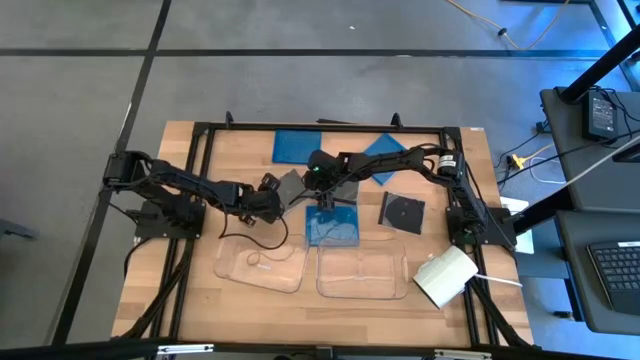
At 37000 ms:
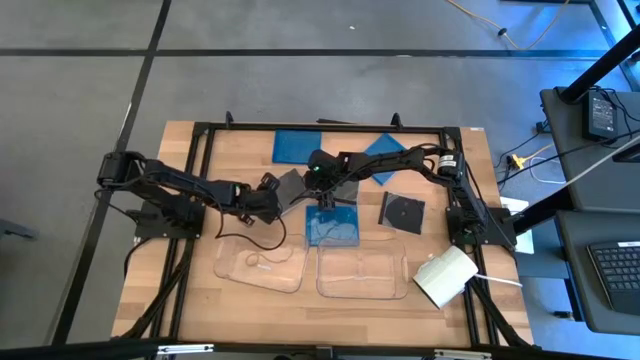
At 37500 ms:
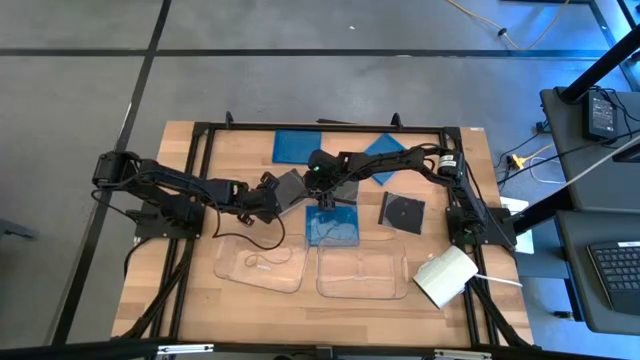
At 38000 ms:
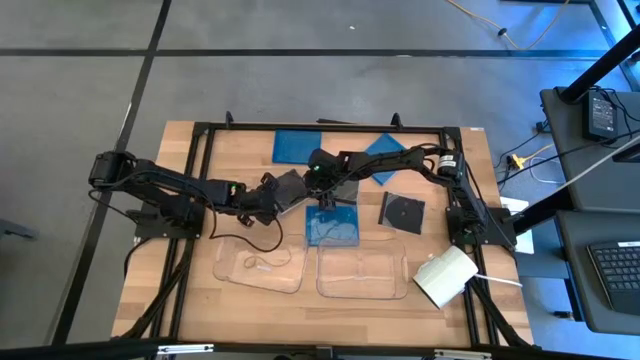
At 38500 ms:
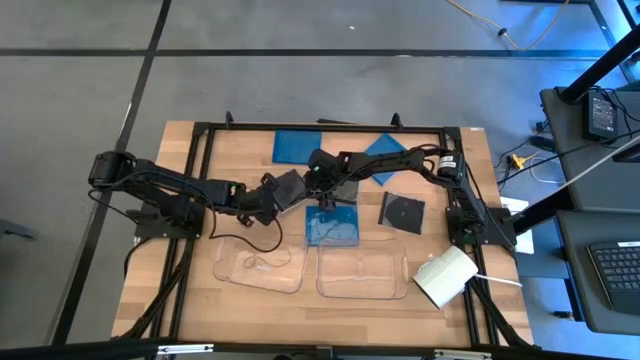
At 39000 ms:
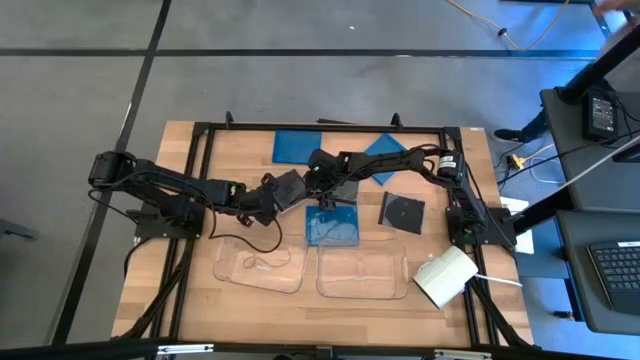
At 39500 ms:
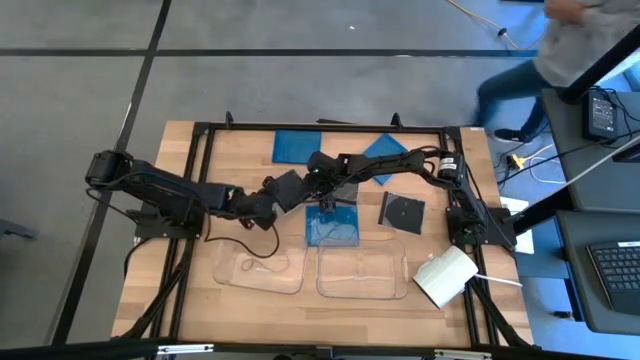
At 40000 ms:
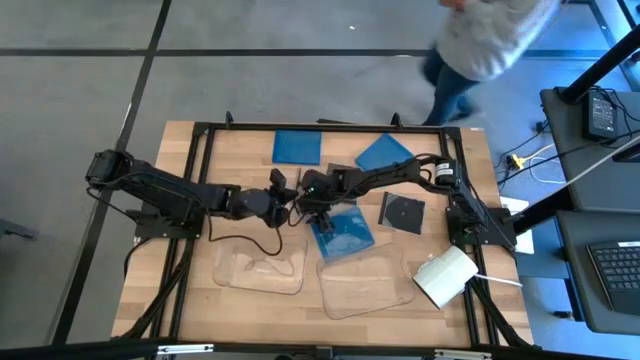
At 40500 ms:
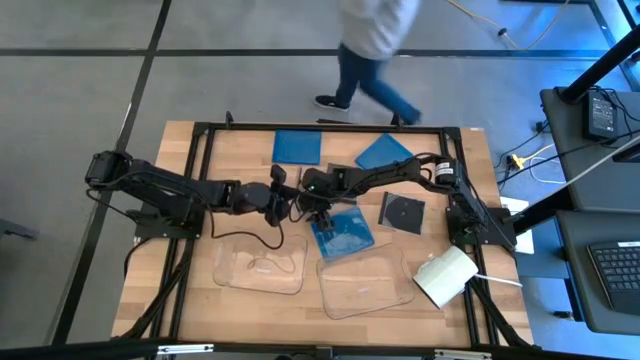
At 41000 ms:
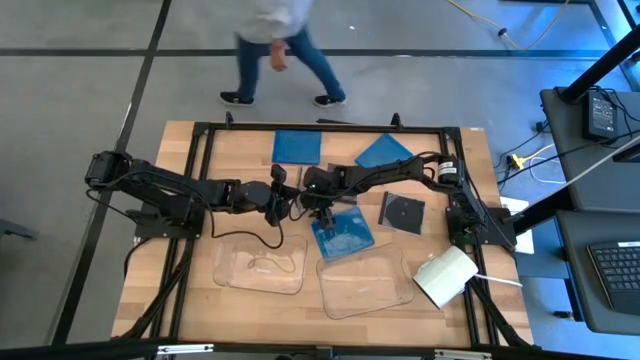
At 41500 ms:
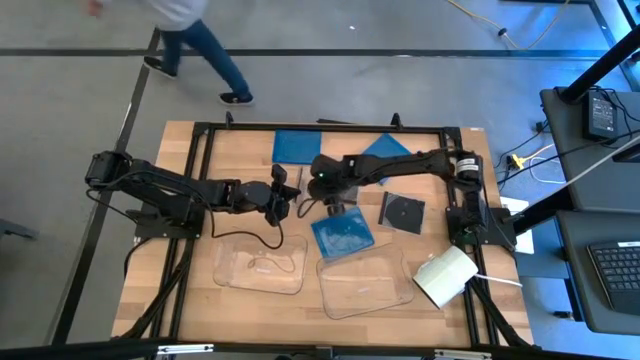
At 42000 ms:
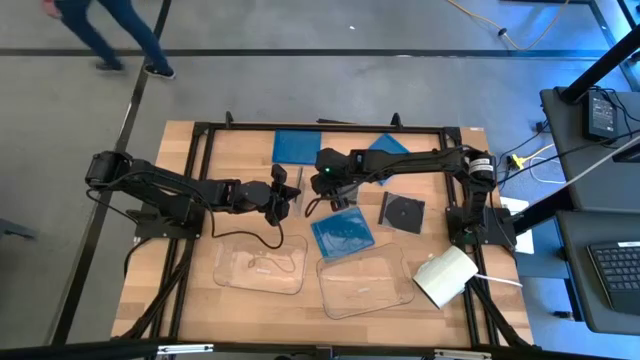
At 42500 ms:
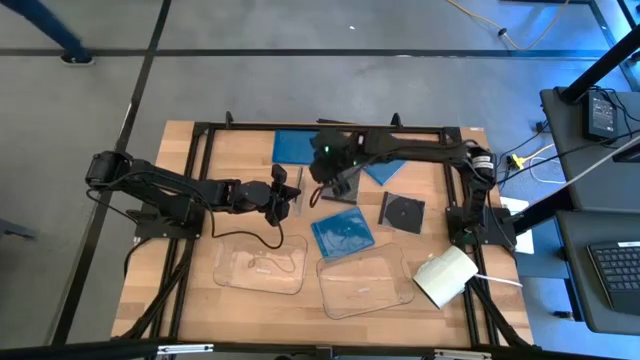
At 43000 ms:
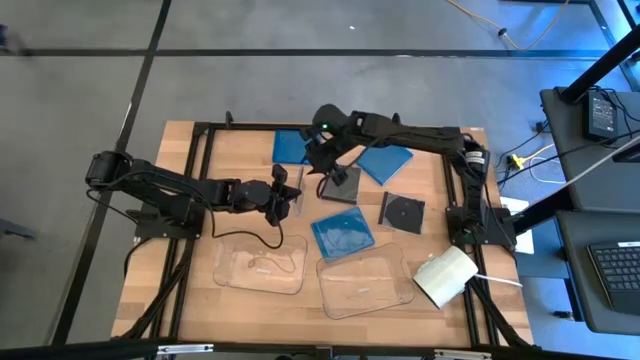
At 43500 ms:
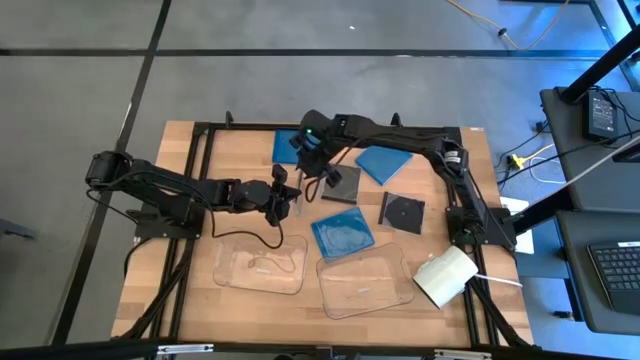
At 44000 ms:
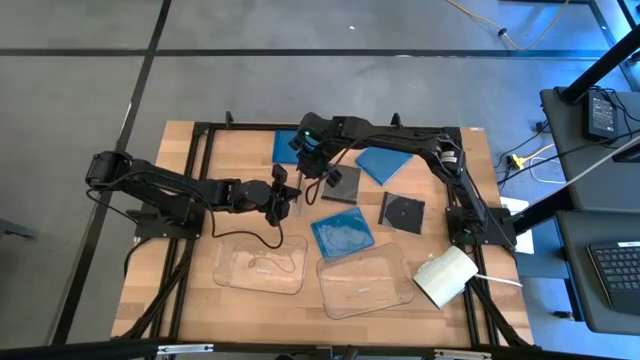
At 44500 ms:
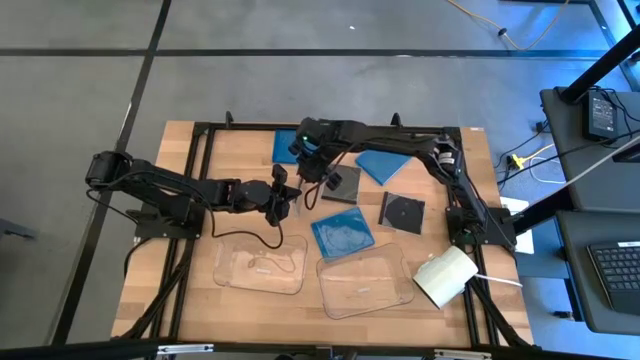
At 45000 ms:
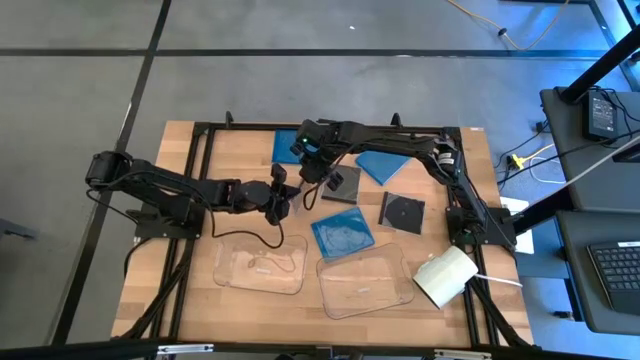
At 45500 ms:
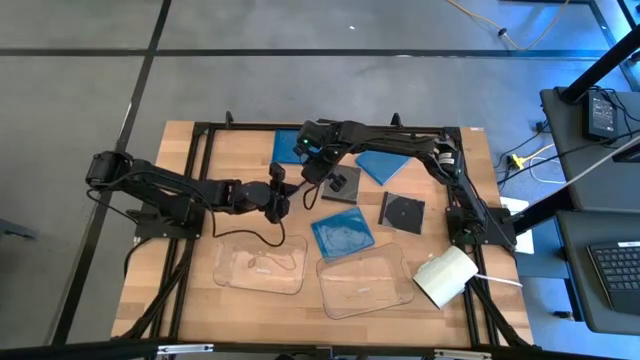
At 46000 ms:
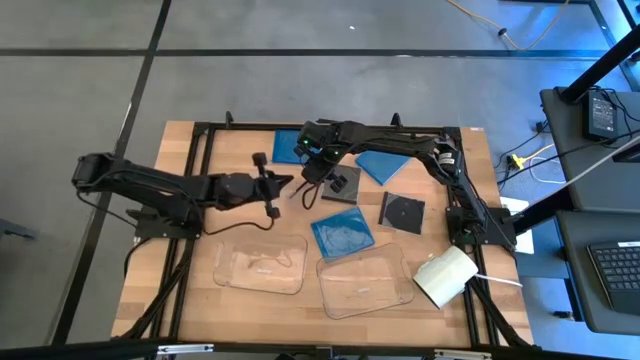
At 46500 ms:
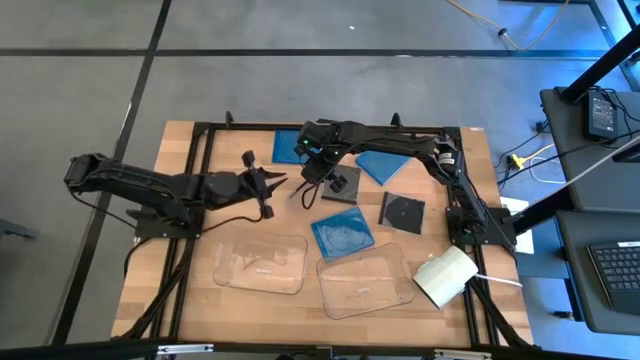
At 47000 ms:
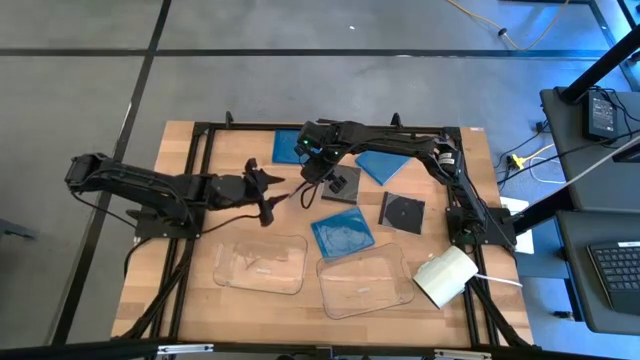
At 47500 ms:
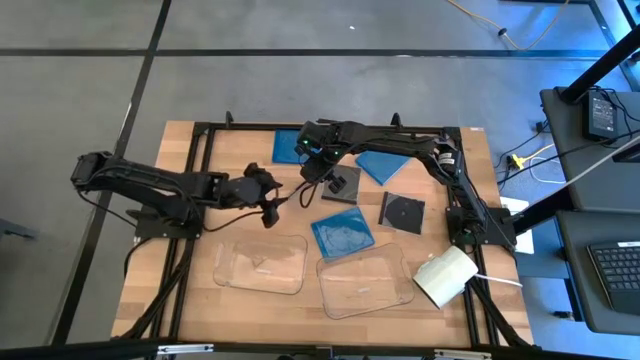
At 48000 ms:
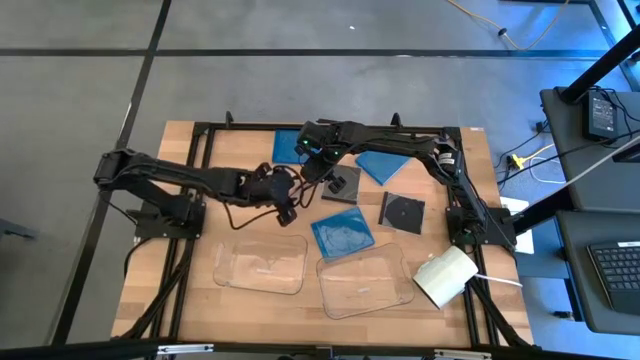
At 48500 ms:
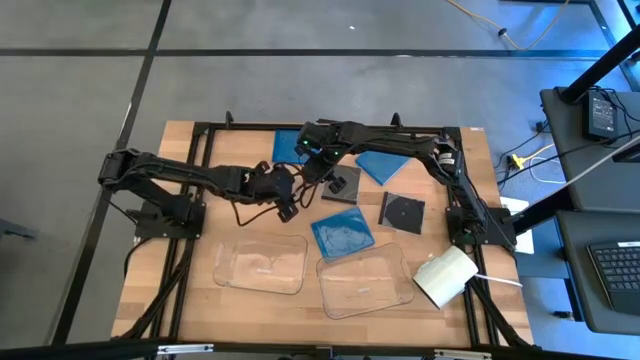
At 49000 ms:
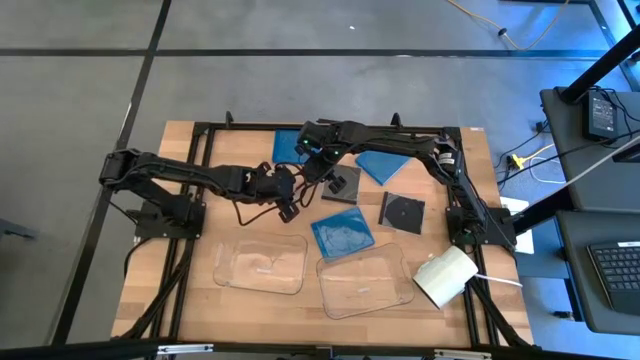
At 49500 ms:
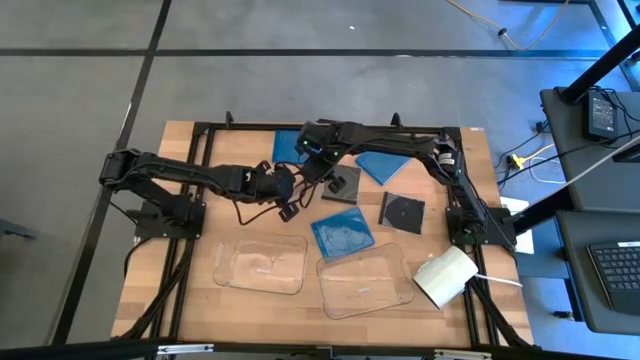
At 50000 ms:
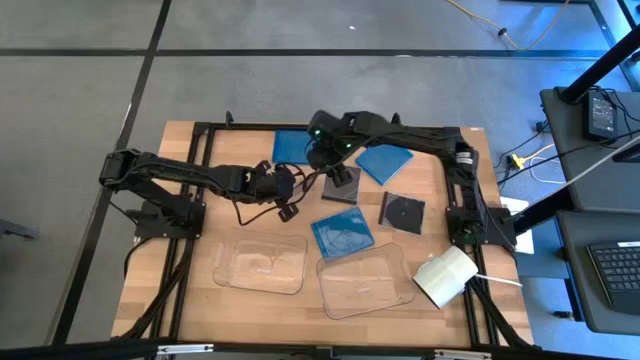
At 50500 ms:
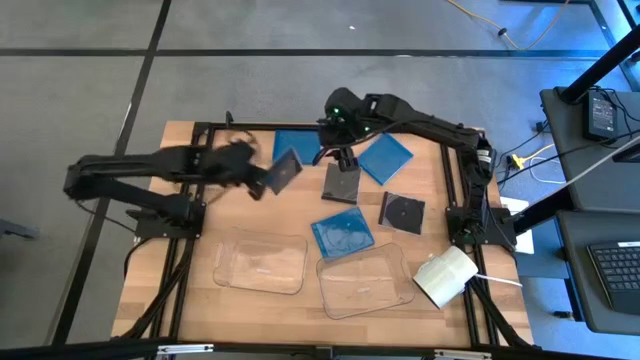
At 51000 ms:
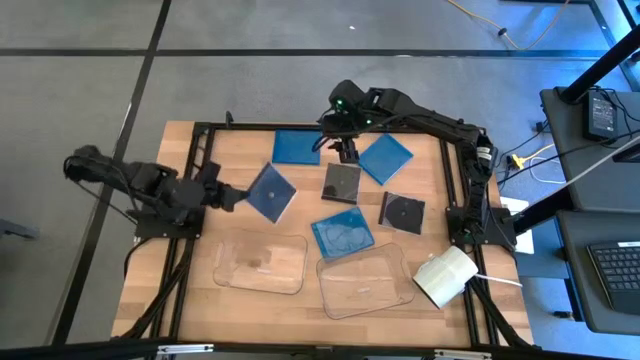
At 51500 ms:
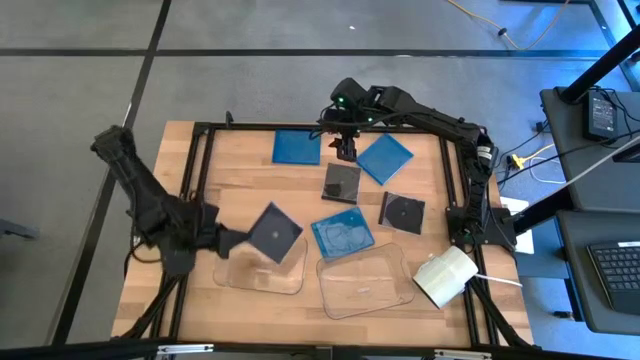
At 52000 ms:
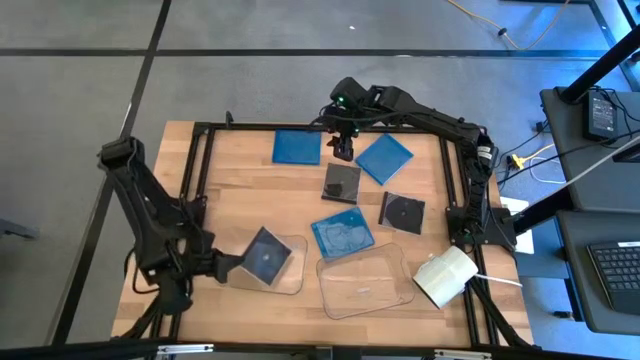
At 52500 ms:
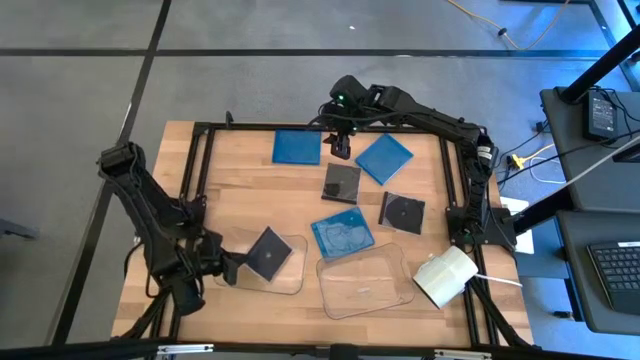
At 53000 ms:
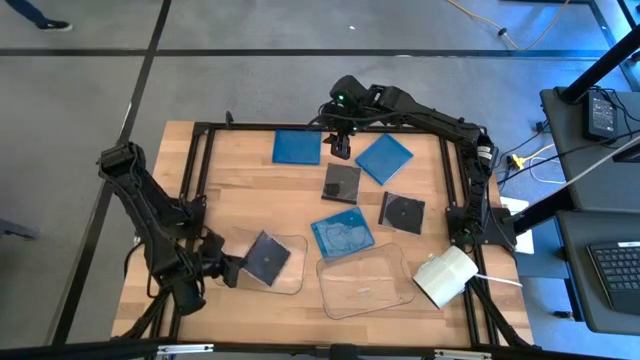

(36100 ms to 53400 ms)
Task: Pick & place jewel cases by type
Put the left black CD case into the left transparent bin
